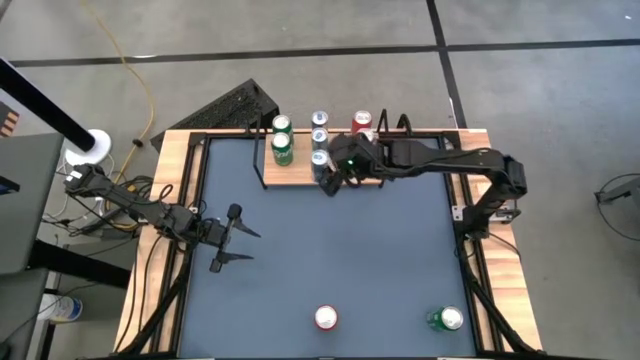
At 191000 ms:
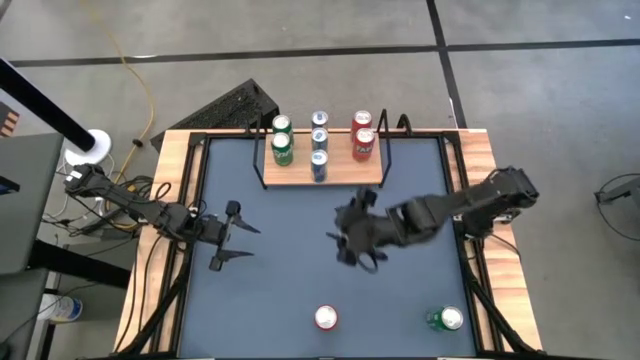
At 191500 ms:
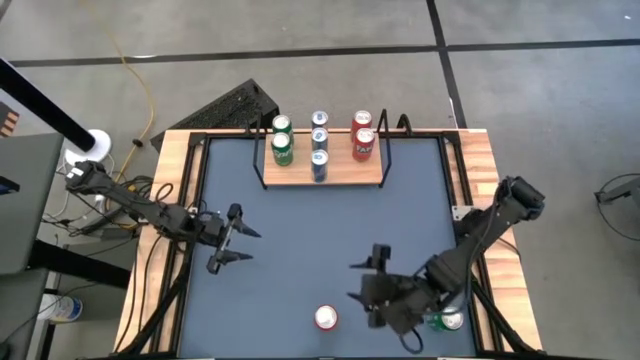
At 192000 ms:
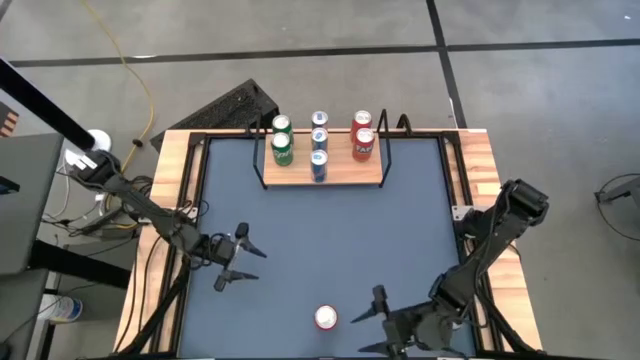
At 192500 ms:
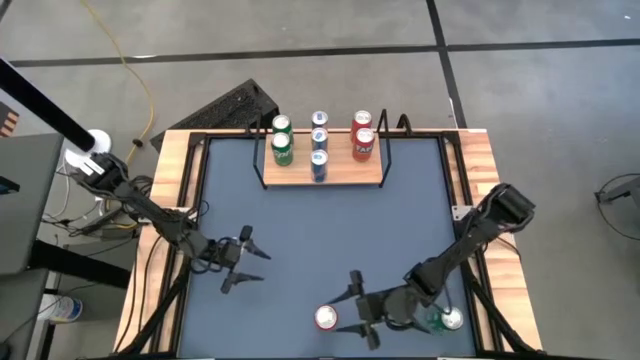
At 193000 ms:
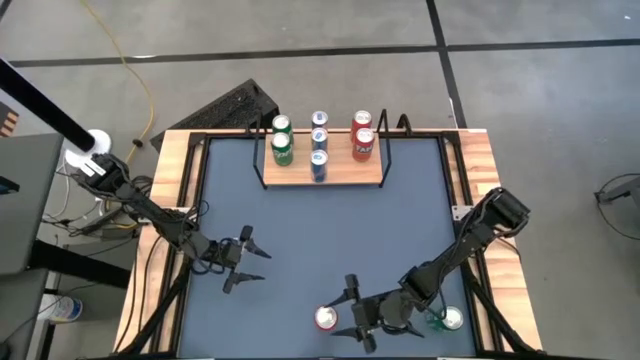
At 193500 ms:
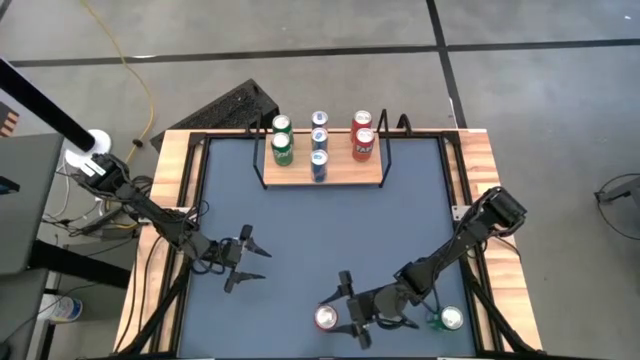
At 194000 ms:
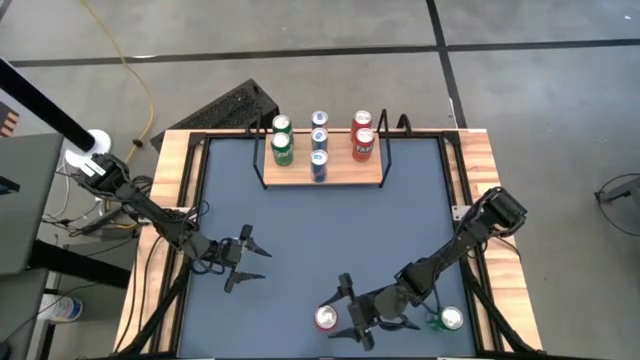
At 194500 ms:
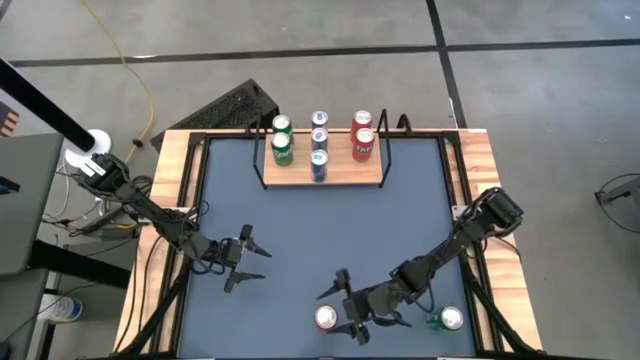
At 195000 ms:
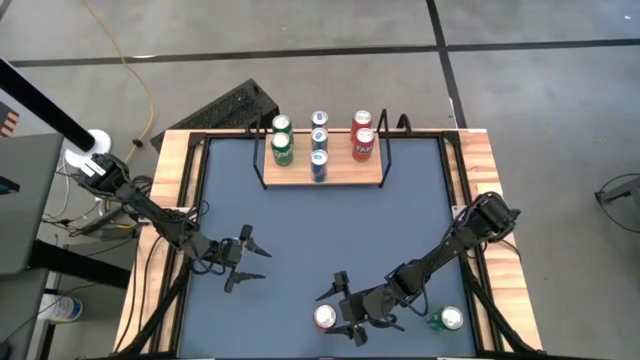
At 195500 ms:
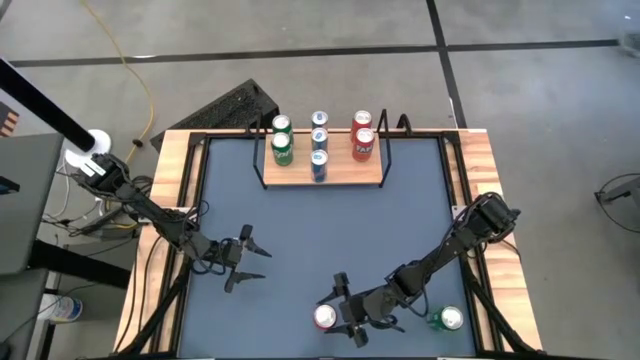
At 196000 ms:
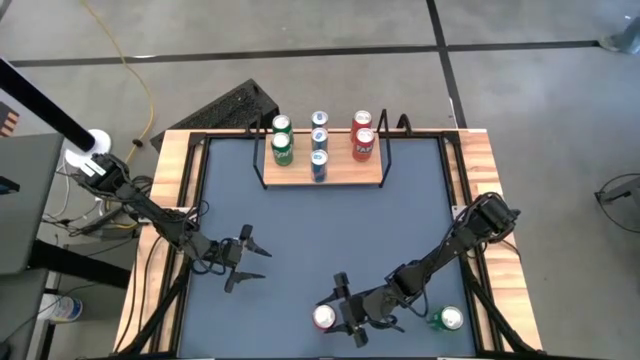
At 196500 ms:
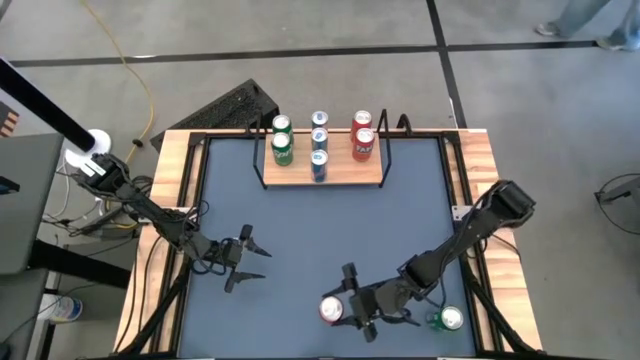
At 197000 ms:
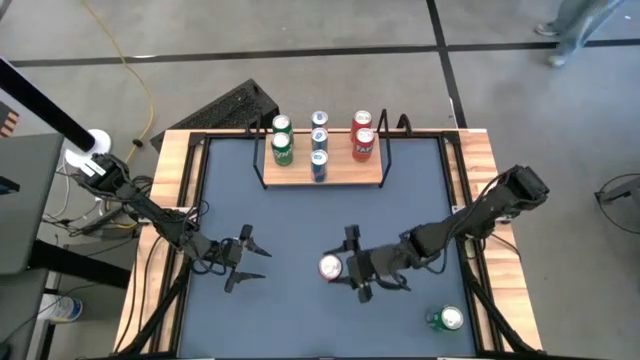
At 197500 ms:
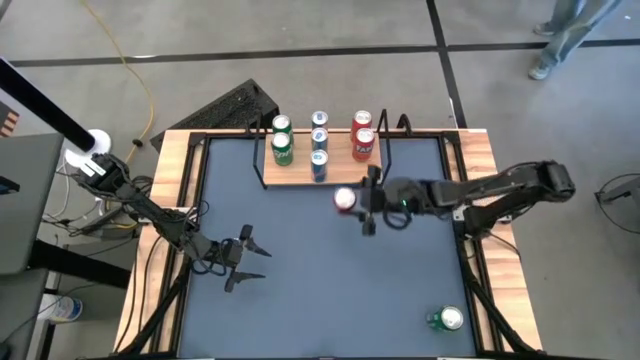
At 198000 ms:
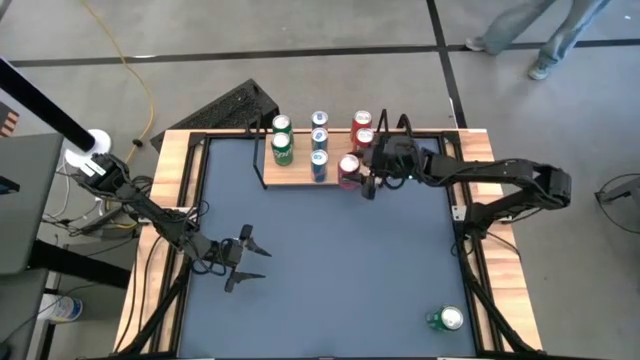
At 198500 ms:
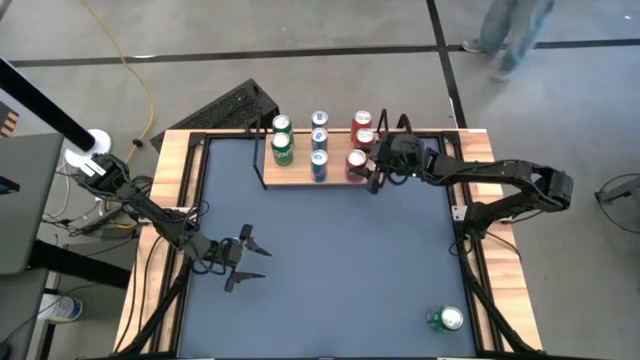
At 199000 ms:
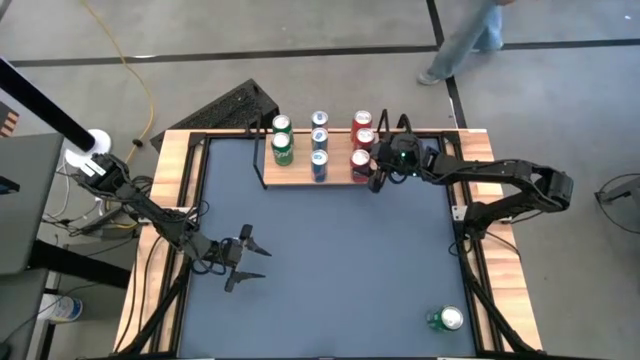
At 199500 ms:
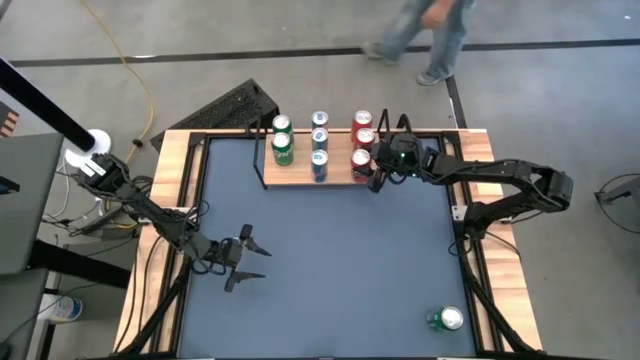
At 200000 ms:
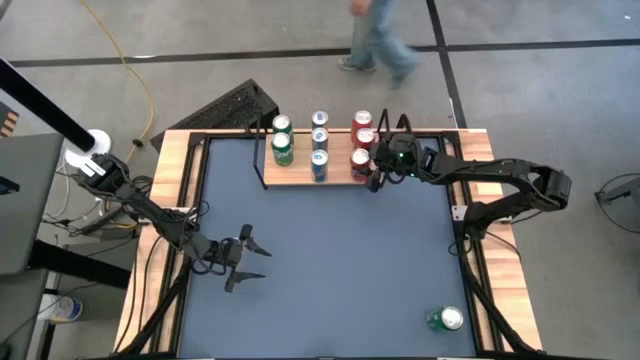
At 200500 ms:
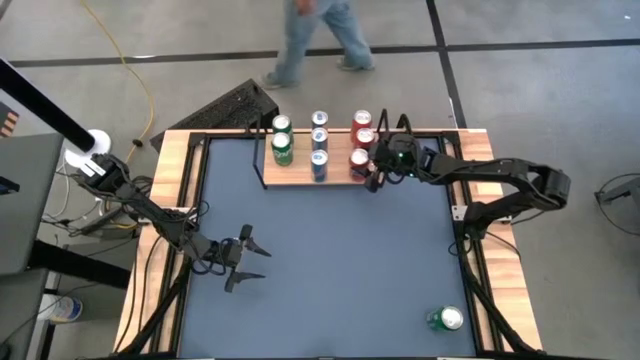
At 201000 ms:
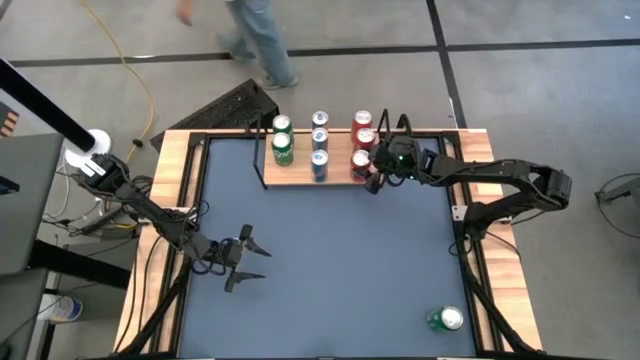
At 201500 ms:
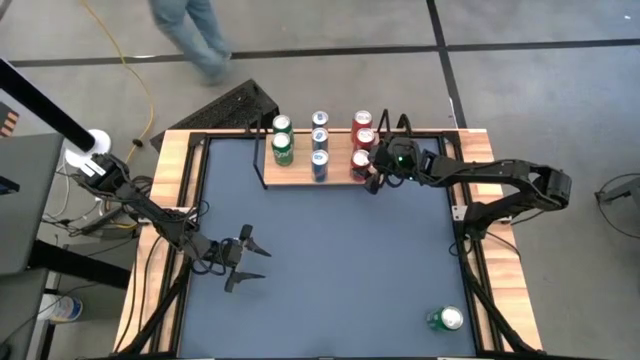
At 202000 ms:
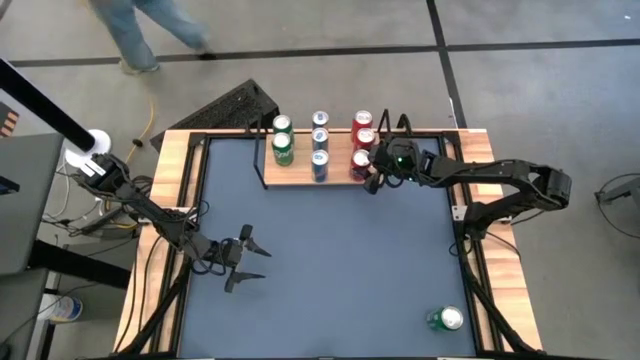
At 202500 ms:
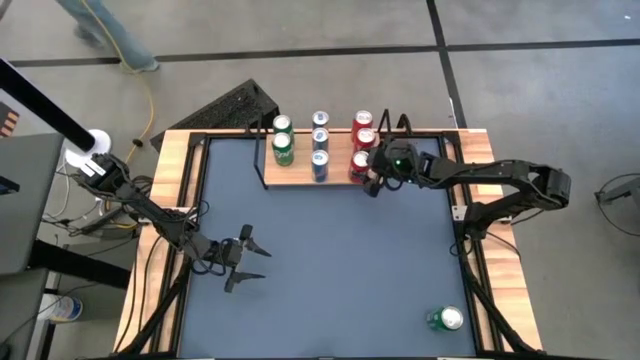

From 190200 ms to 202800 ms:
Task: Place canned beverage on shelf
Put the orange soda can on the shelf aligned with the other orange soda cans

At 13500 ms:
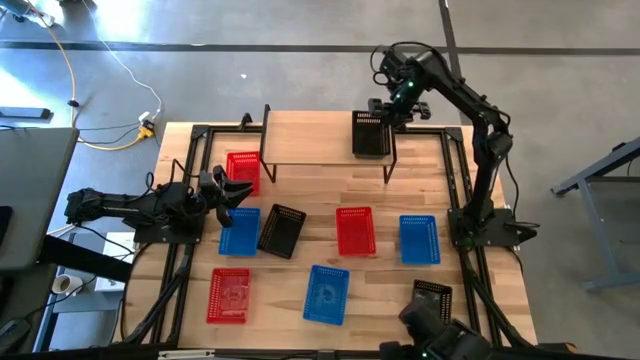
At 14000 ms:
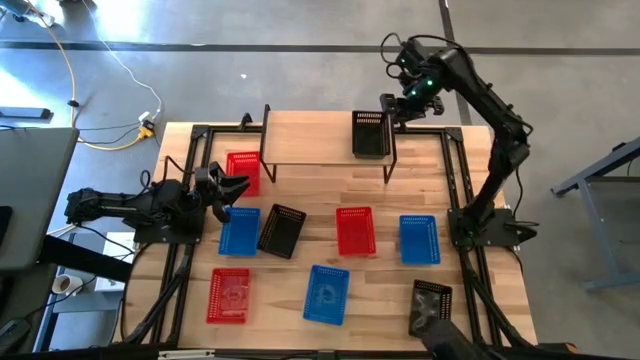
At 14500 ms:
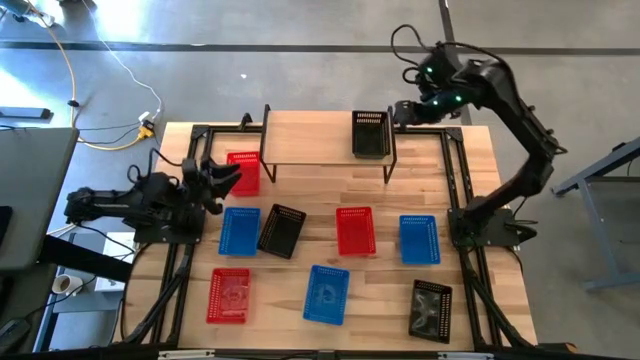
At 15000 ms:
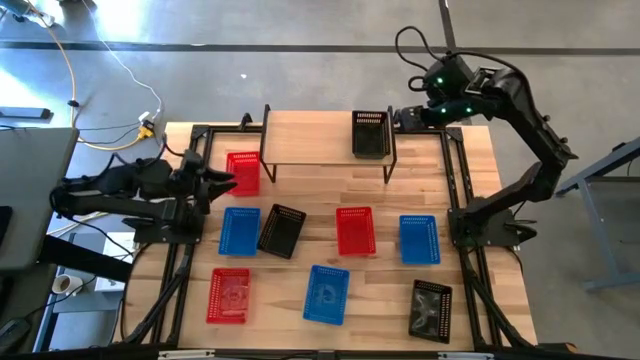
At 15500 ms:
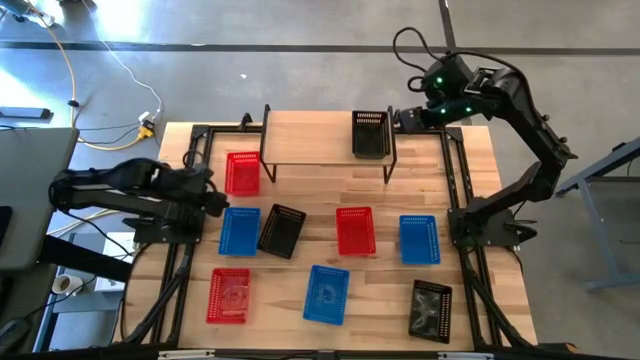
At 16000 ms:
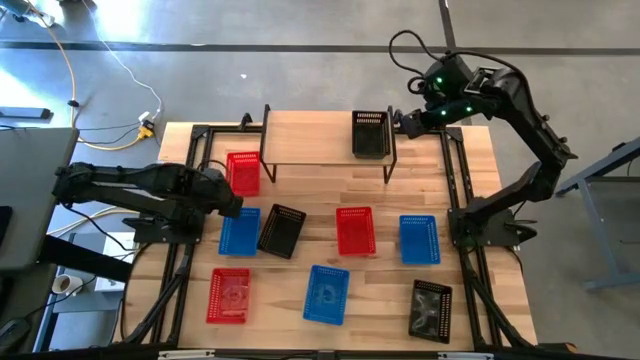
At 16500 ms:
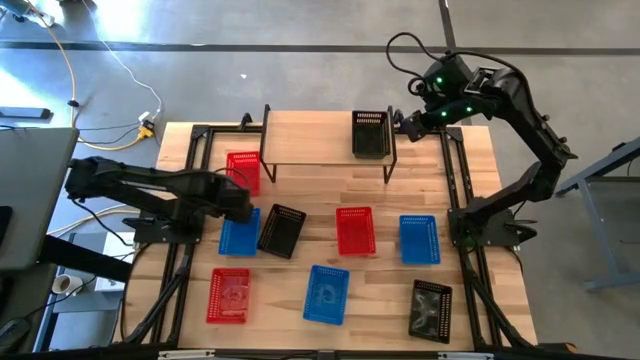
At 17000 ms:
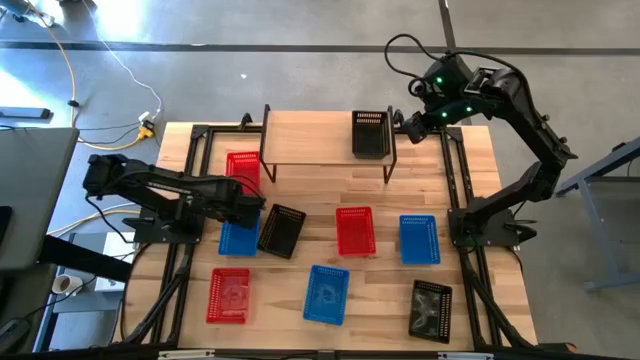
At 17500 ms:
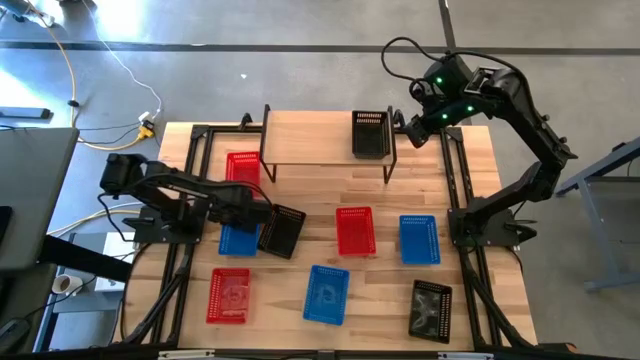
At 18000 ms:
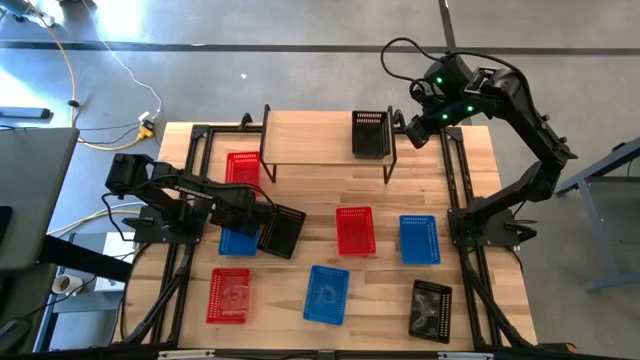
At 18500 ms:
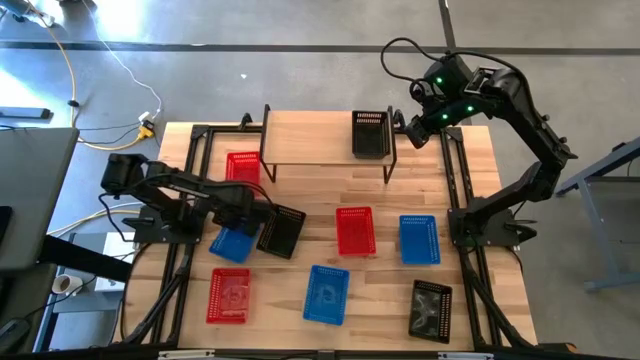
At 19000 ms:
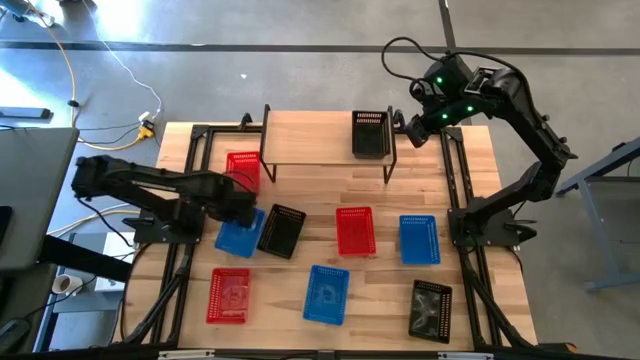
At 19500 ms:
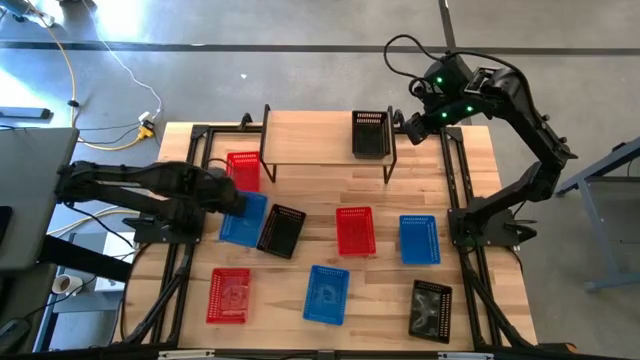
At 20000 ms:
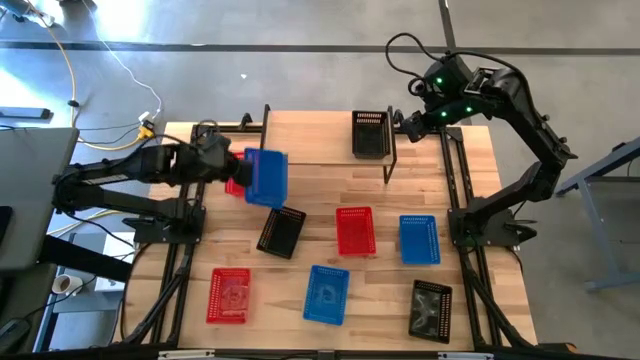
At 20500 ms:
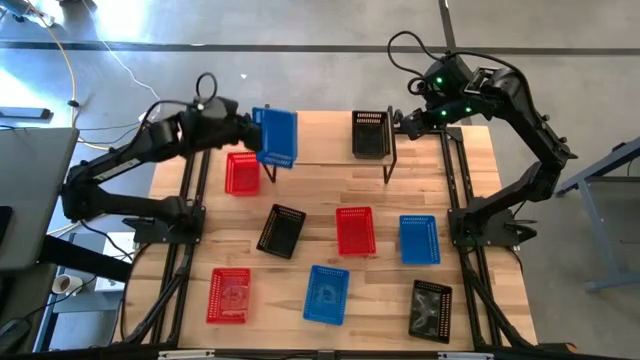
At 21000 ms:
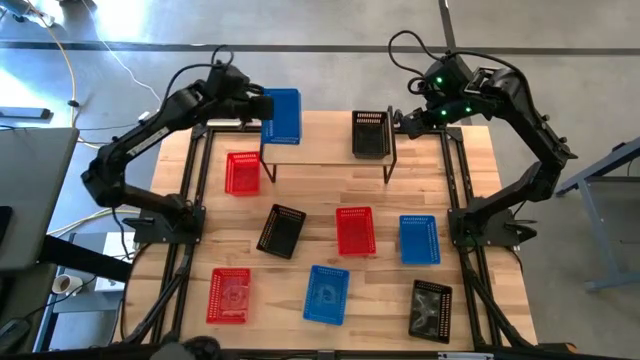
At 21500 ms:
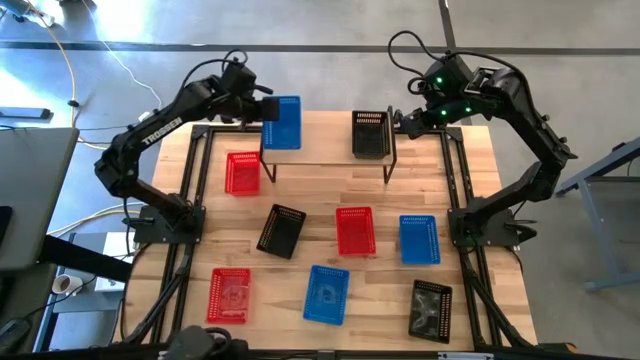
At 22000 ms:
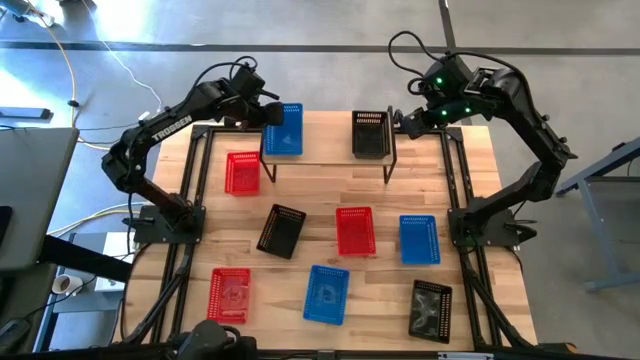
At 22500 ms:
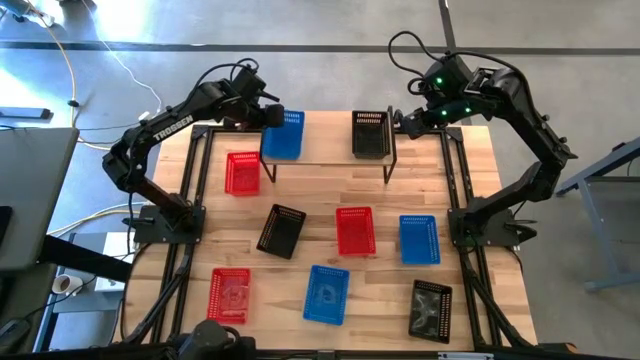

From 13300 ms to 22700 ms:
Task: Stack baskets on shelf by color
Put the left blue basket on the shelf
